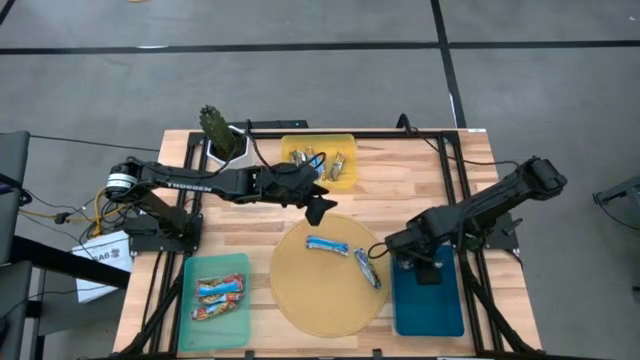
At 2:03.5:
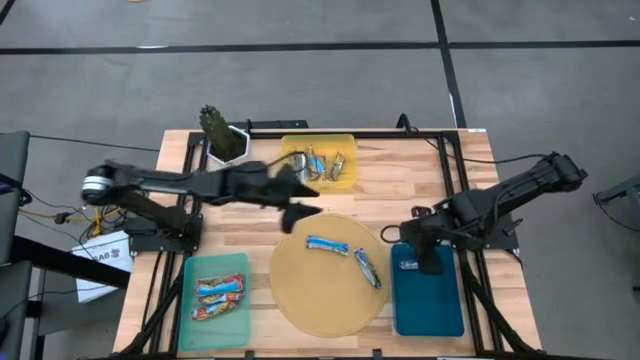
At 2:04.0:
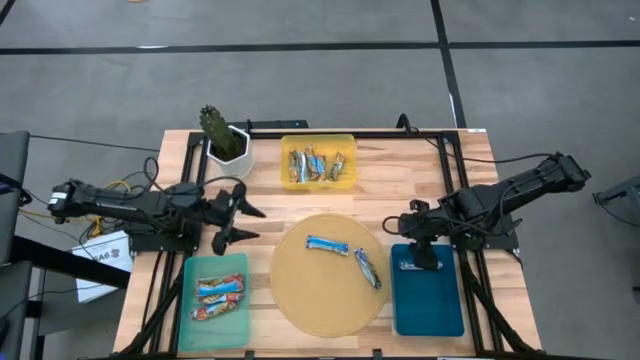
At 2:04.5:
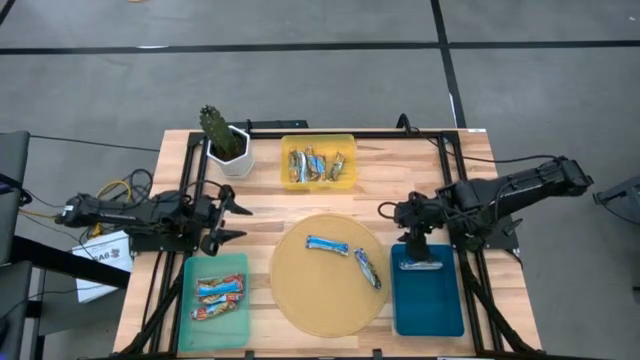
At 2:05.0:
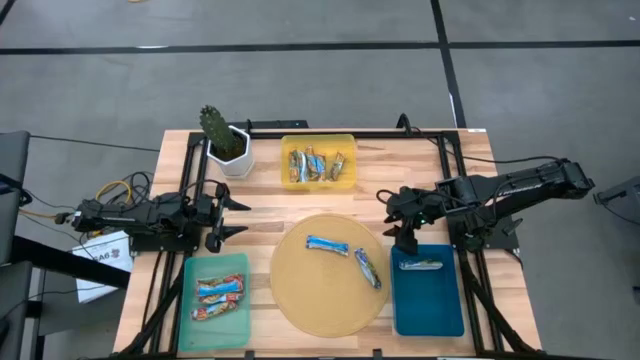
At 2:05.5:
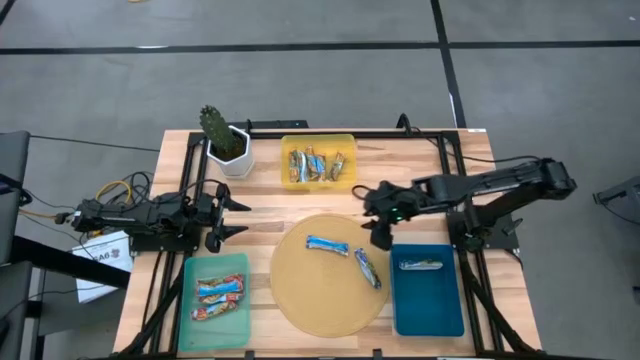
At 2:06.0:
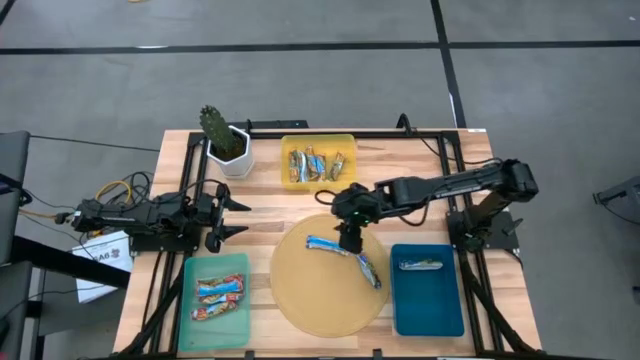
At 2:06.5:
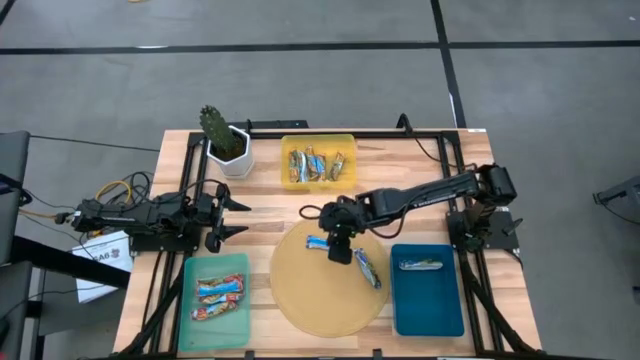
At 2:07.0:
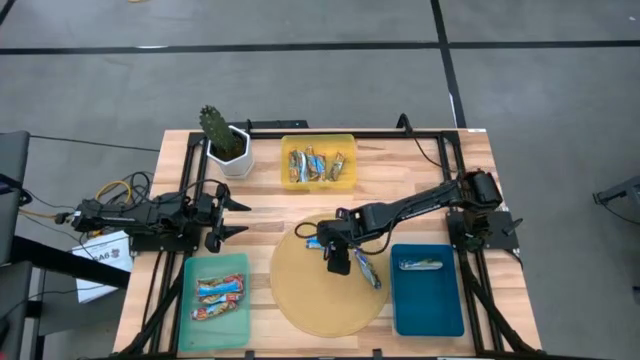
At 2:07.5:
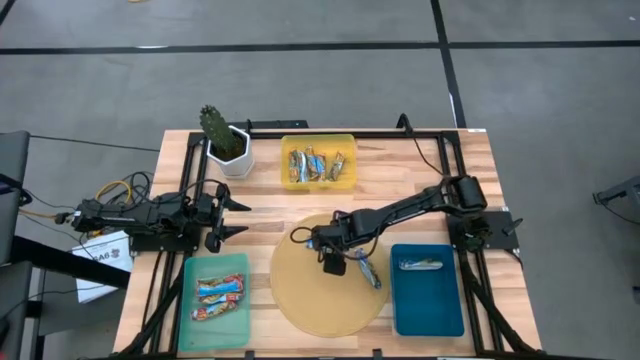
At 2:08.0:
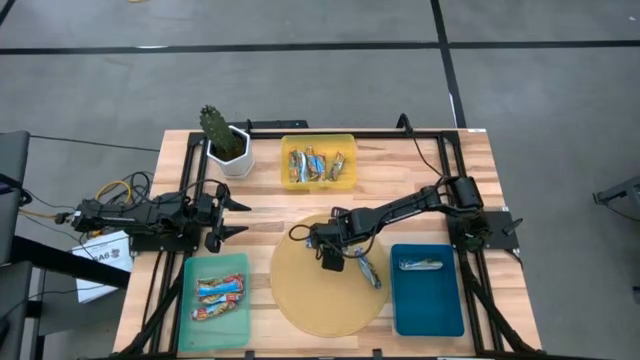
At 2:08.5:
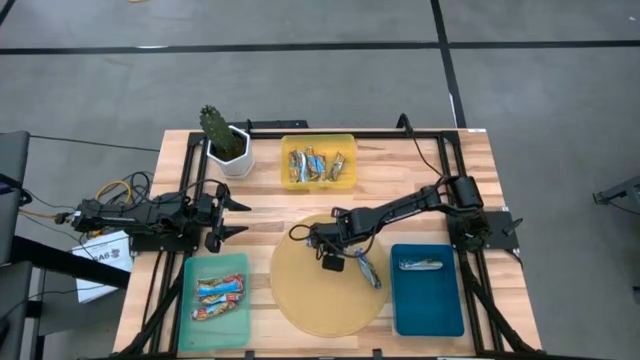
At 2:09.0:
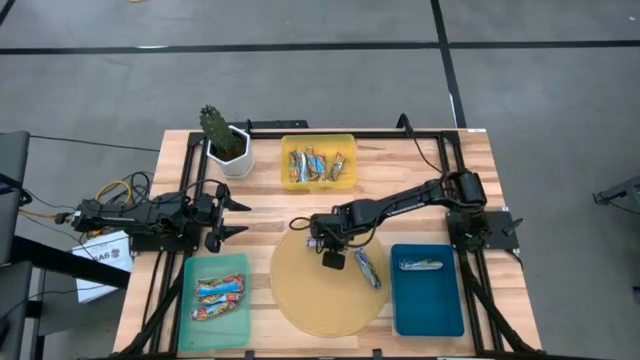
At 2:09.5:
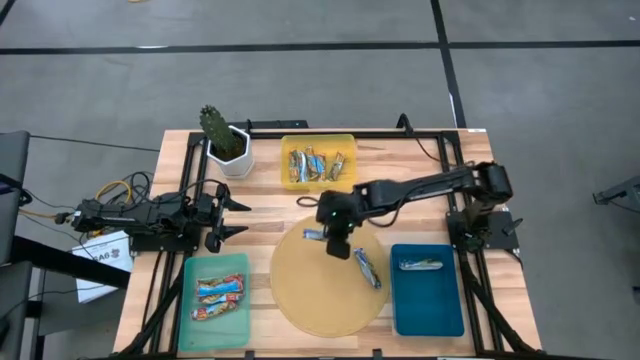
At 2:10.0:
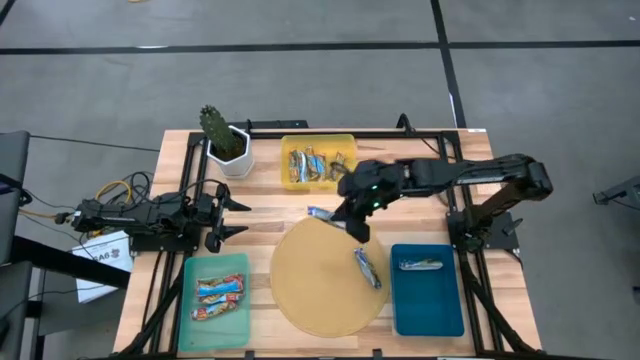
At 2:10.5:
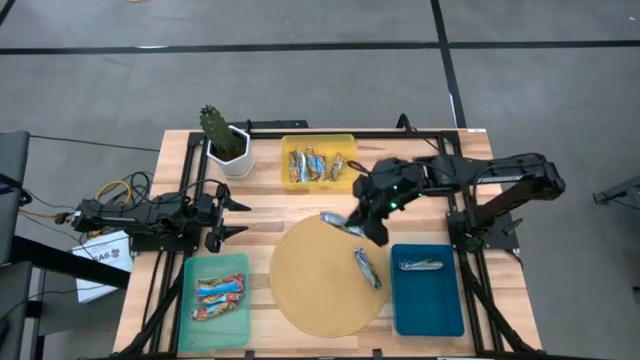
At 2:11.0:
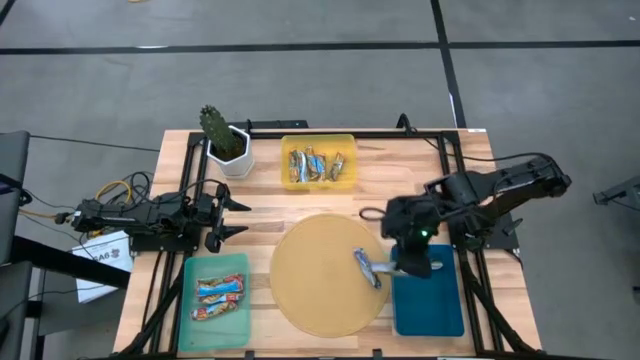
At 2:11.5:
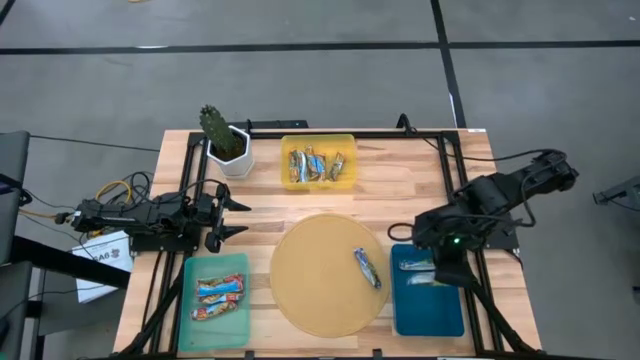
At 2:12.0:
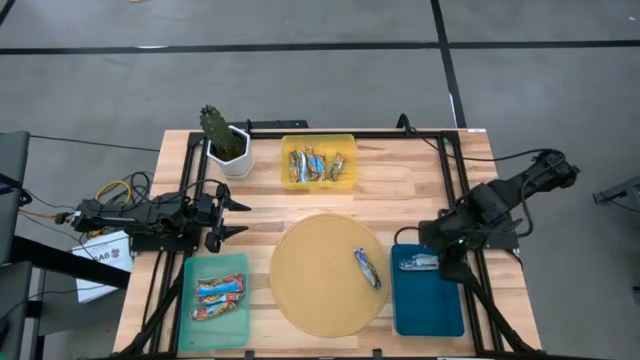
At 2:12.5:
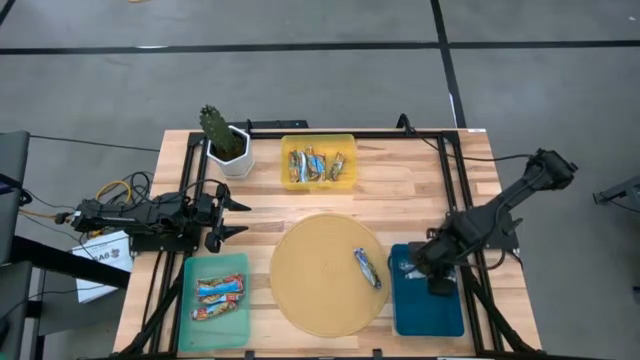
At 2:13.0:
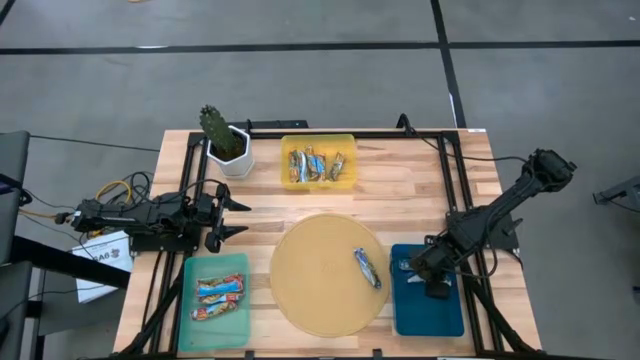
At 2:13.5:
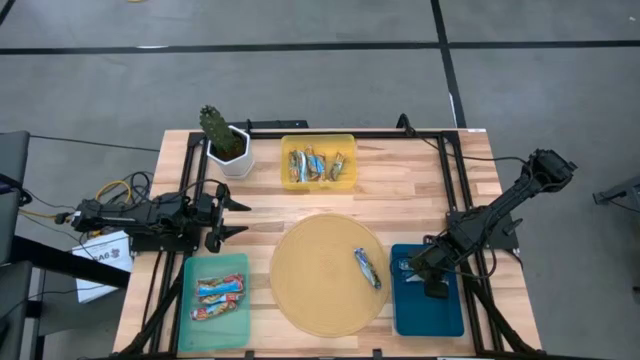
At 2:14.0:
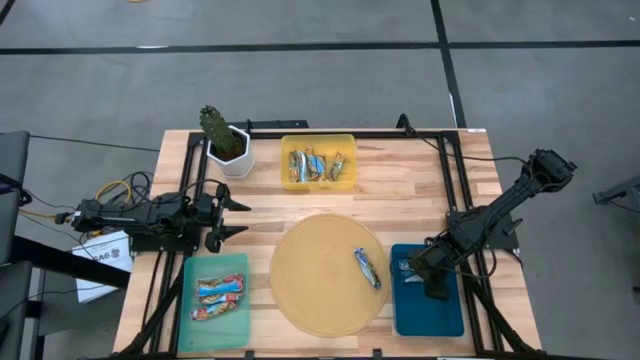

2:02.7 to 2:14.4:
Task: Pick and place Granola Bars by type
Put the blue granola bar into the dark blue bin

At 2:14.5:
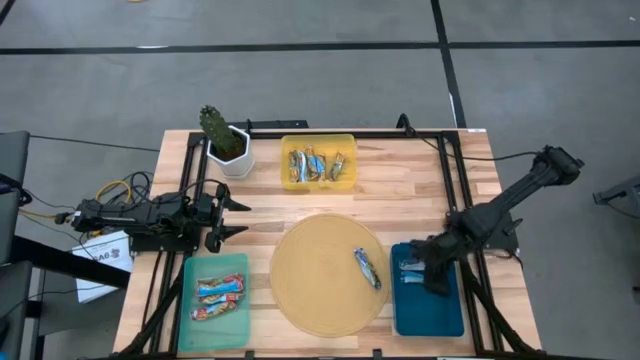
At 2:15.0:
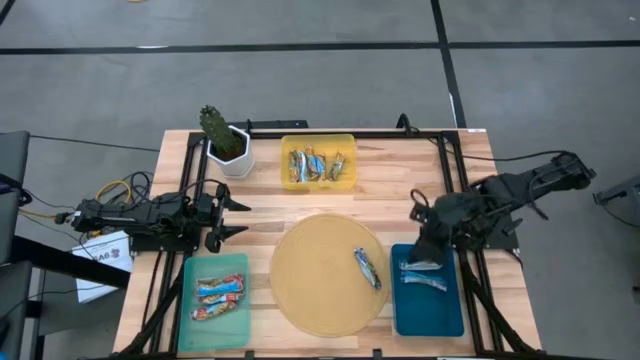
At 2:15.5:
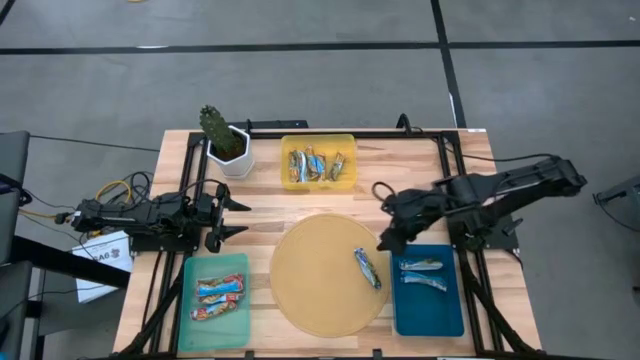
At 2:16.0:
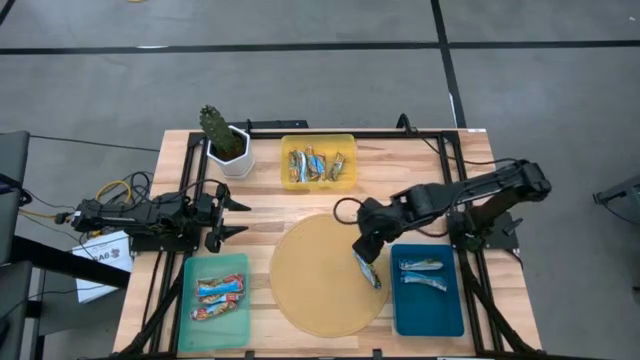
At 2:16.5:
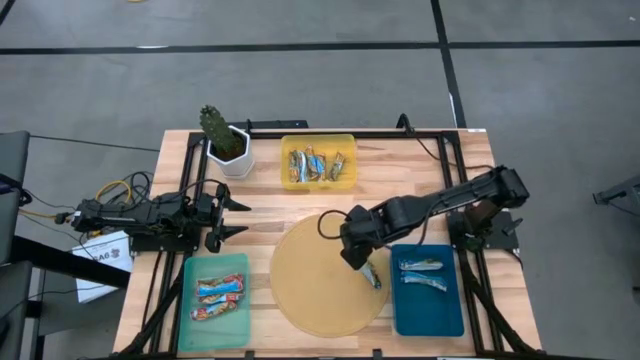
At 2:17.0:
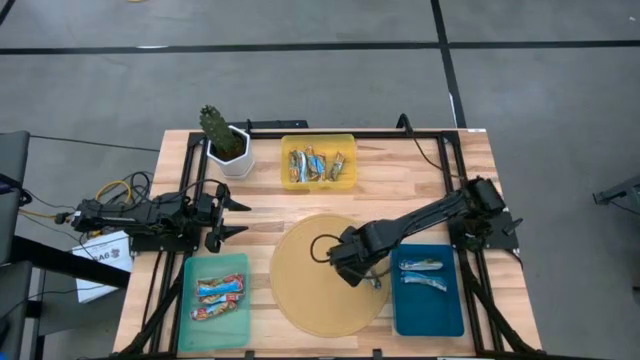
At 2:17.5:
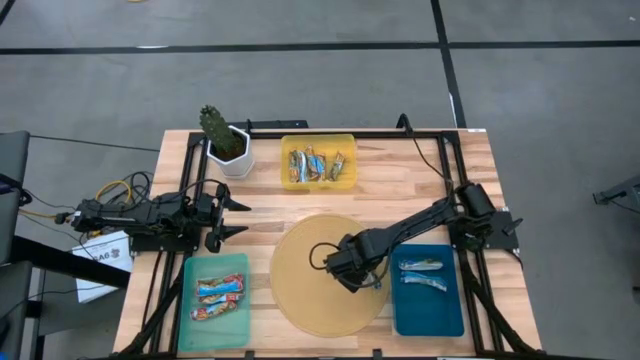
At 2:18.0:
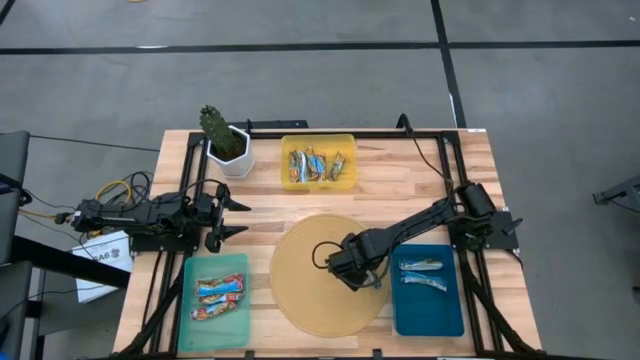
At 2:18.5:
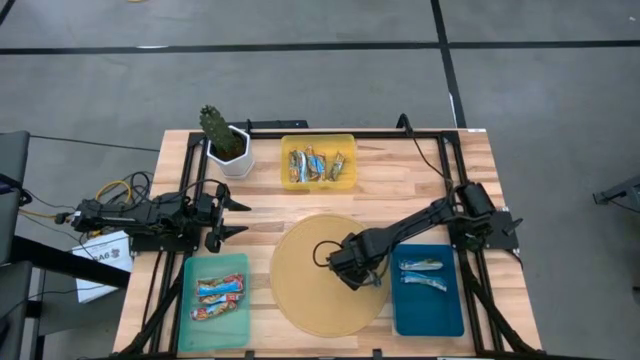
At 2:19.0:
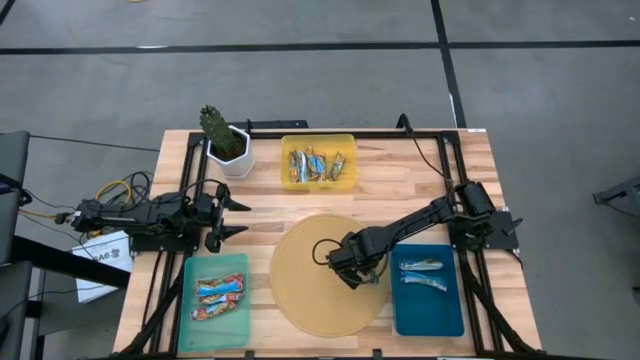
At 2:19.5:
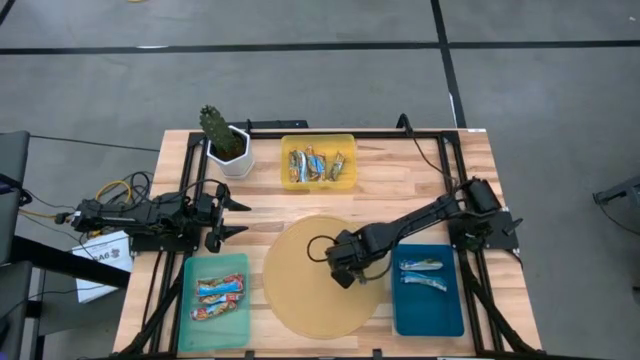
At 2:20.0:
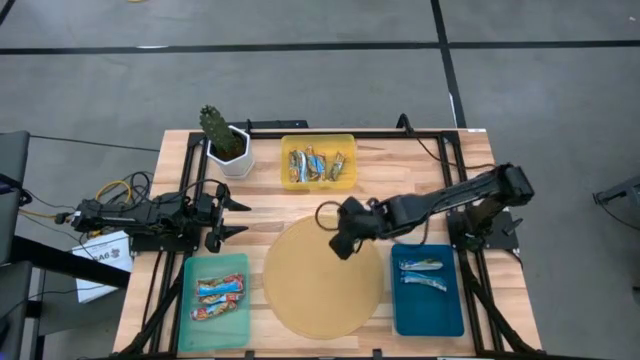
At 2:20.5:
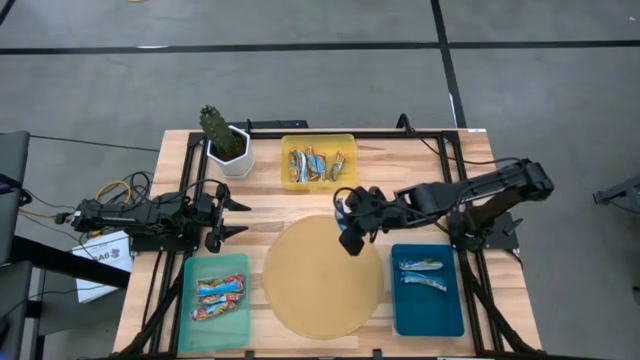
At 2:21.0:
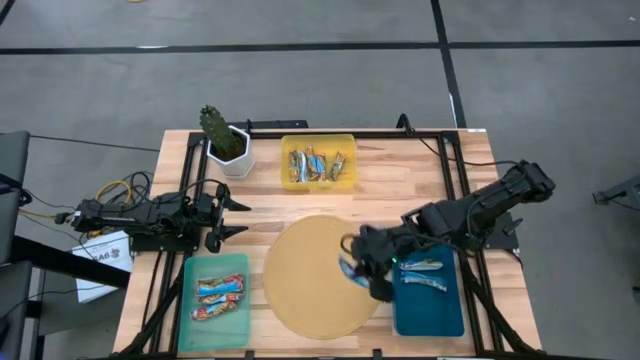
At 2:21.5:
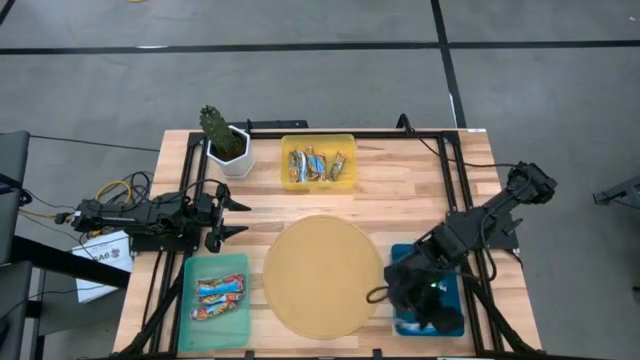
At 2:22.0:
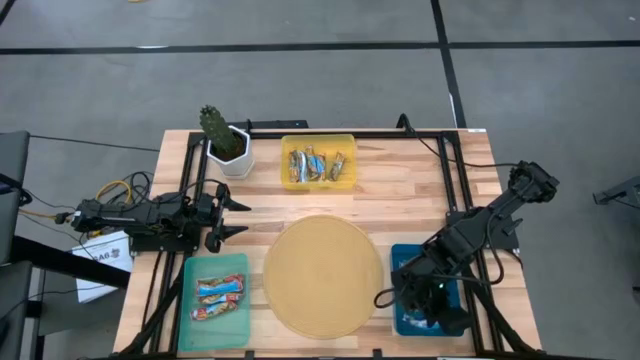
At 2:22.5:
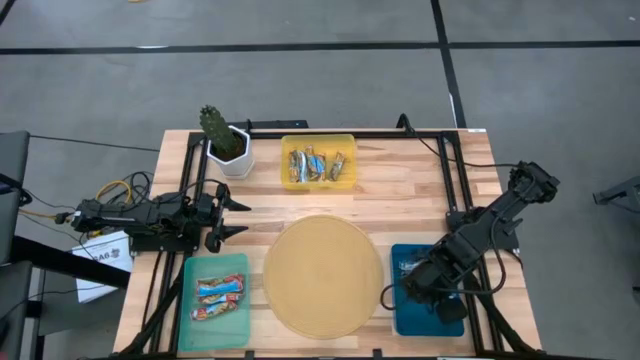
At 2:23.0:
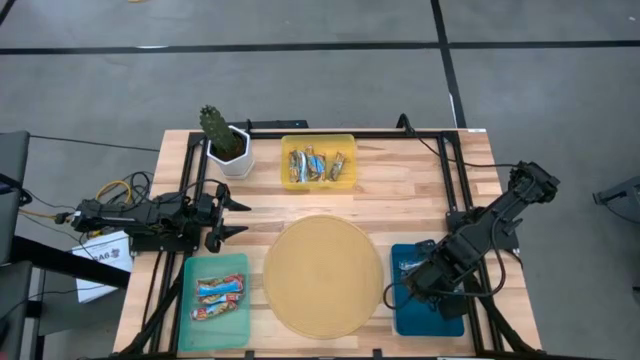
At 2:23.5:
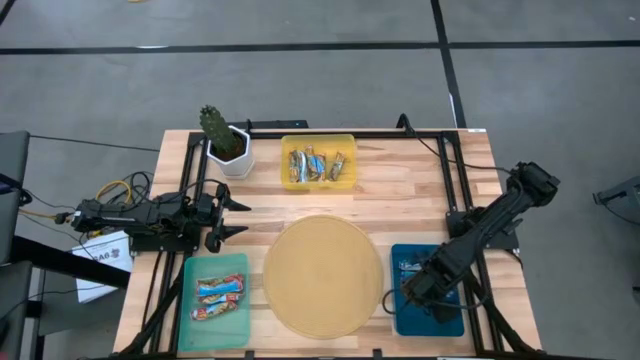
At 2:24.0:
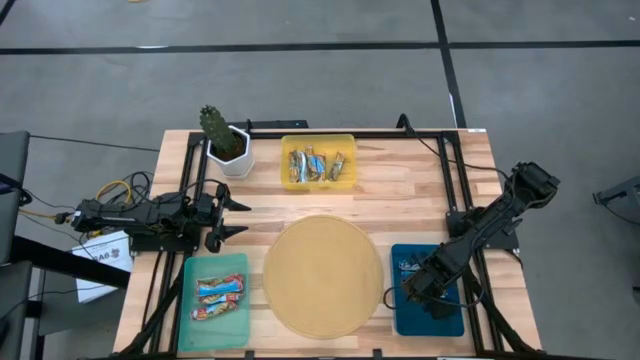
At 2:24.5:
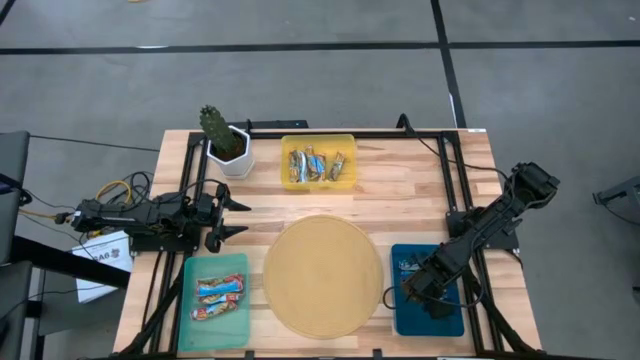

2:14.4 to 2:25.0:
Put the blue granola bar into the dark blue bin
